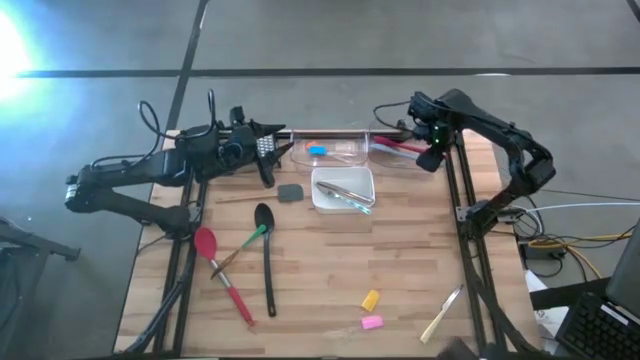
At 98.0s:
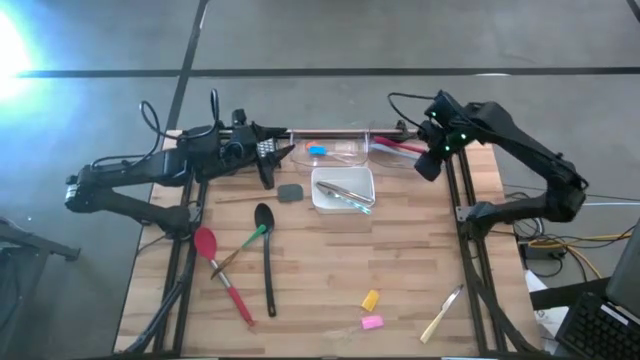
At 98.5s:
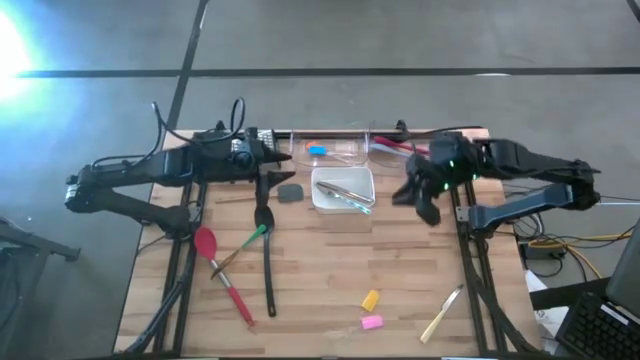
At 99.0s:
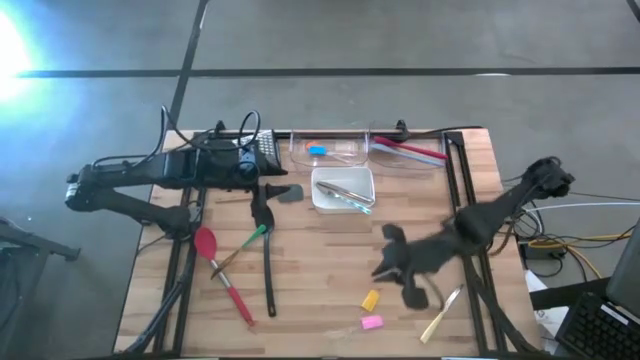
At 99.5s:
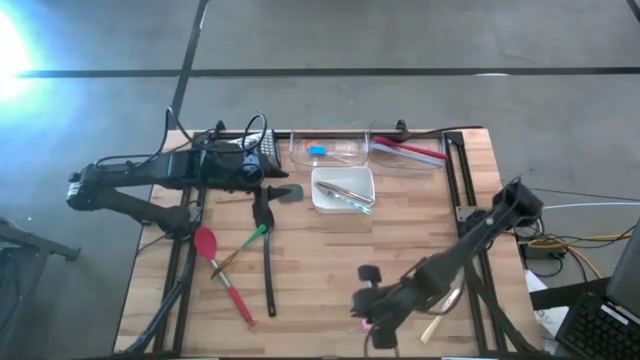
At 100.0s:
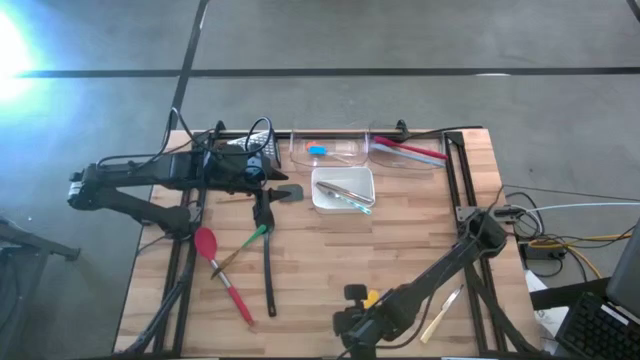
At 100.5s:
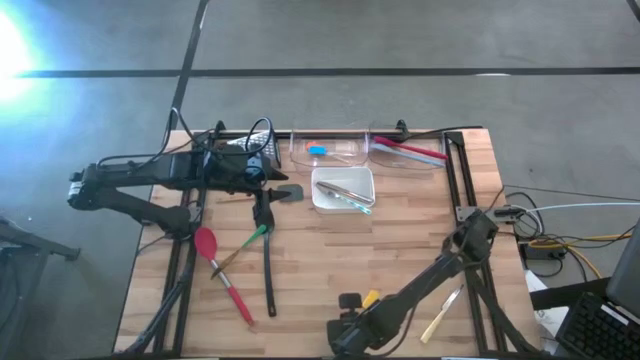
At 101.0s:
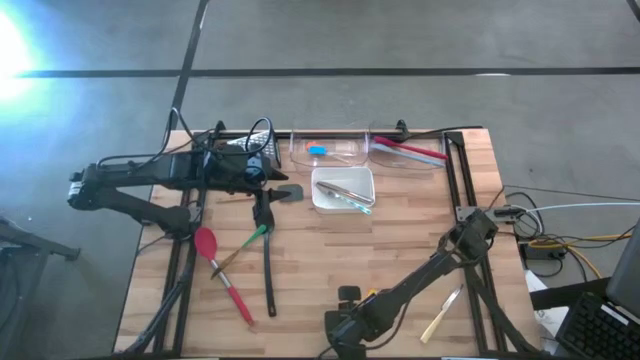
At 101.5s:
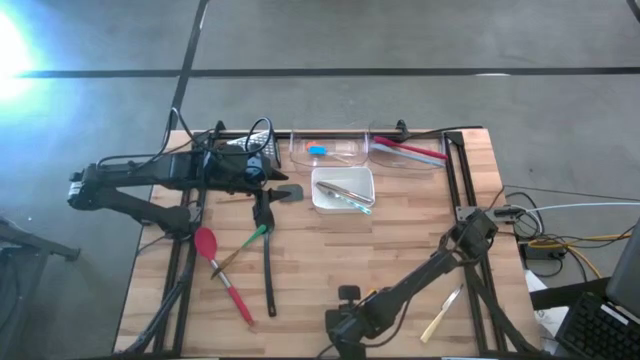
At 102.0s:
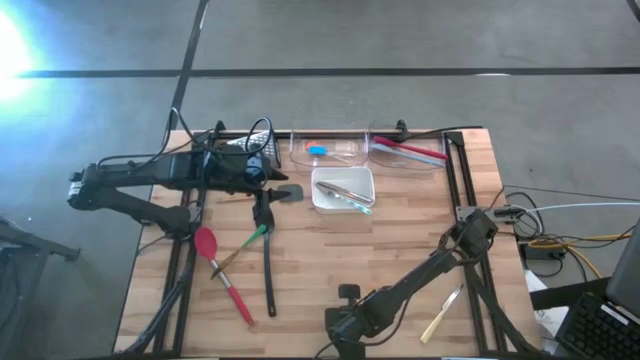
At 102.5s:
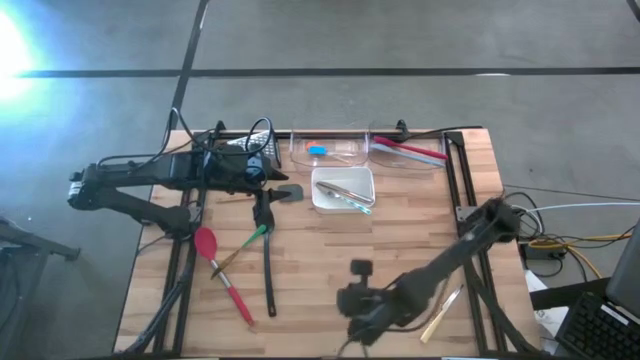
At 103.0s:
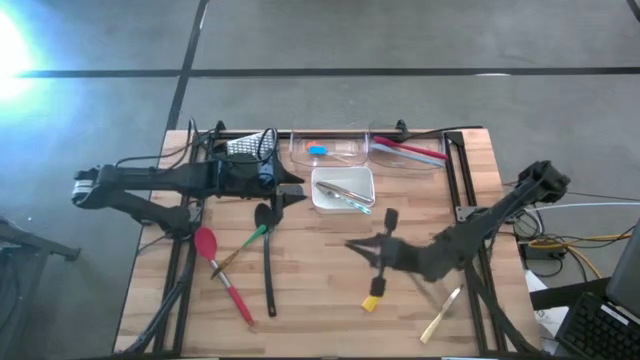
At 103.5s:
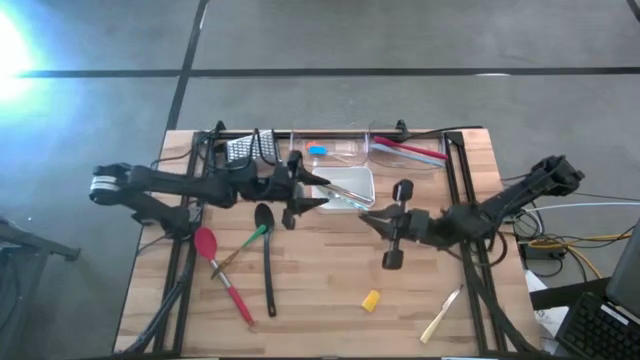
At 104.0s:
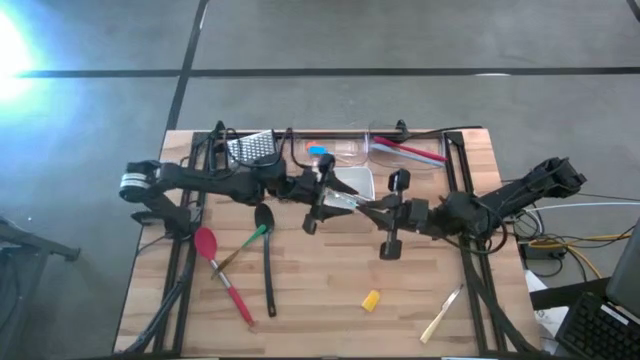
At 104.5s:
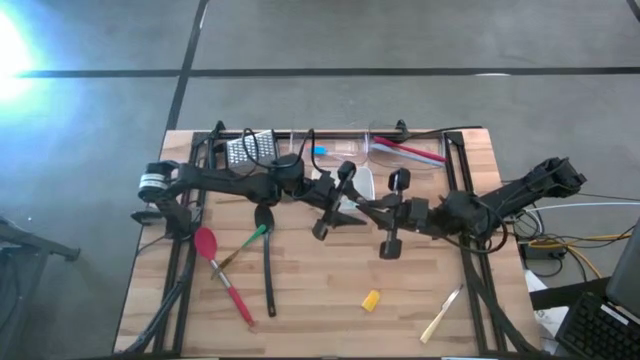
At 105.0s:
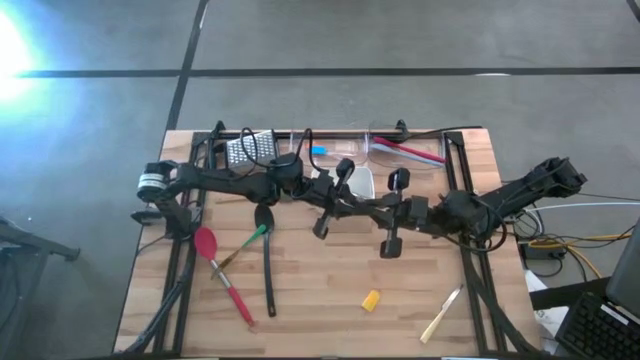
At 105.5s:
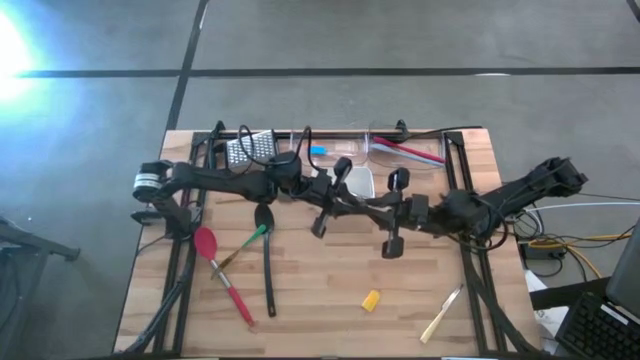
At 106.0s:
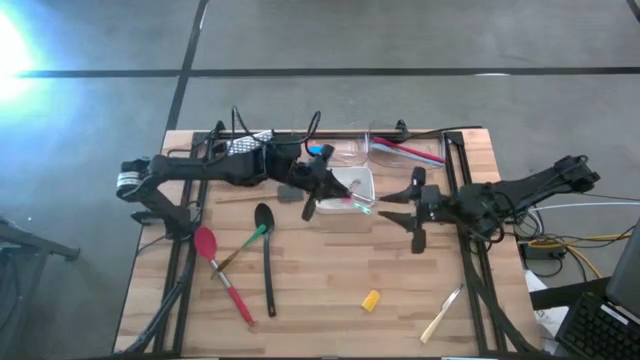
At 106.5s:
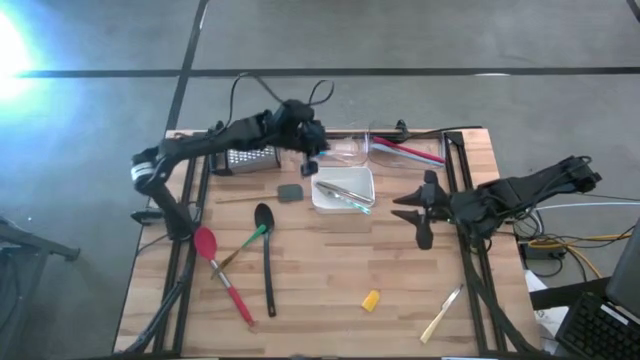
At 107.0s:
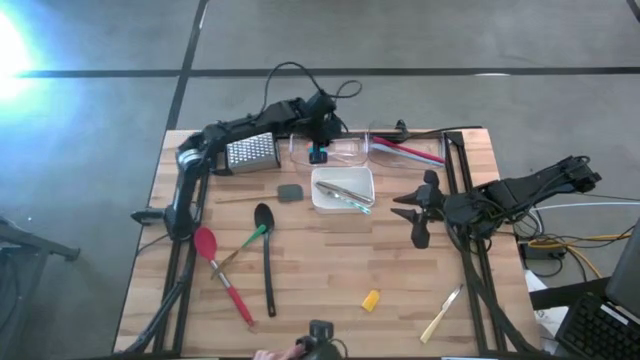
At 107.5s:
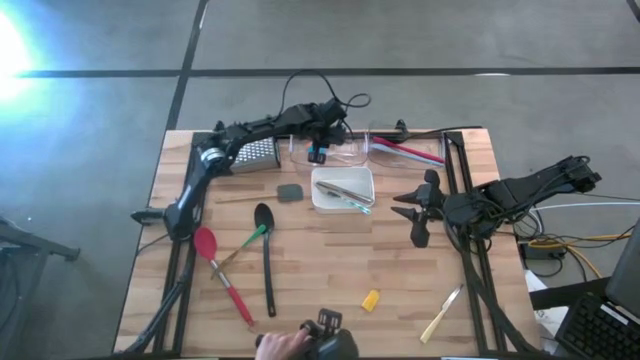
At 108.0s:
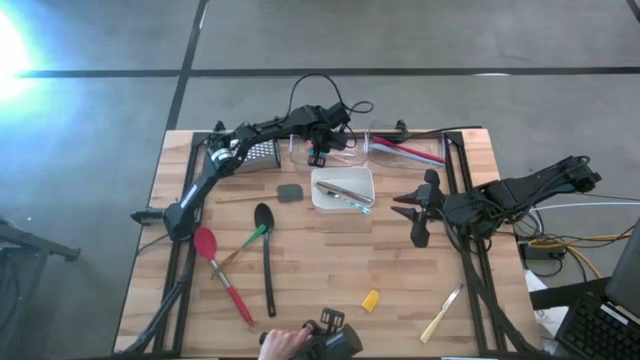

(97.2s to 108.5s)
Task: Pick & Place Kitchen Items
Put the pink spatula into the left transparent bin

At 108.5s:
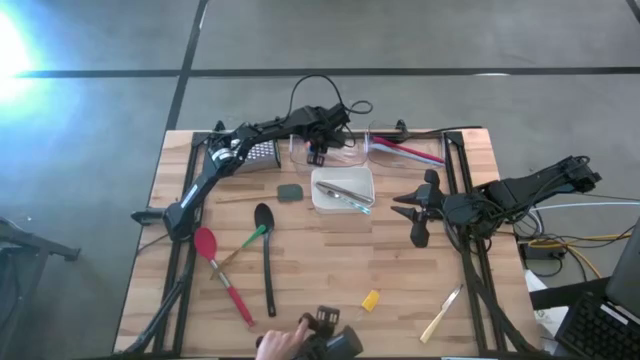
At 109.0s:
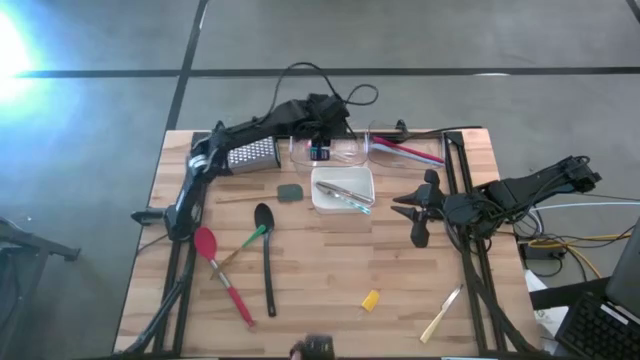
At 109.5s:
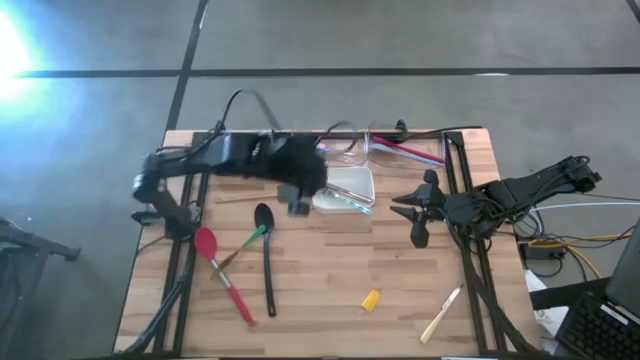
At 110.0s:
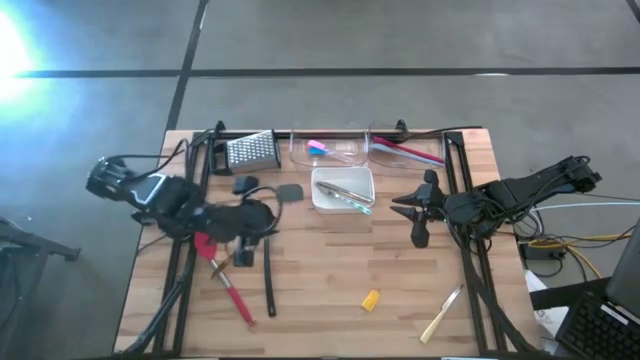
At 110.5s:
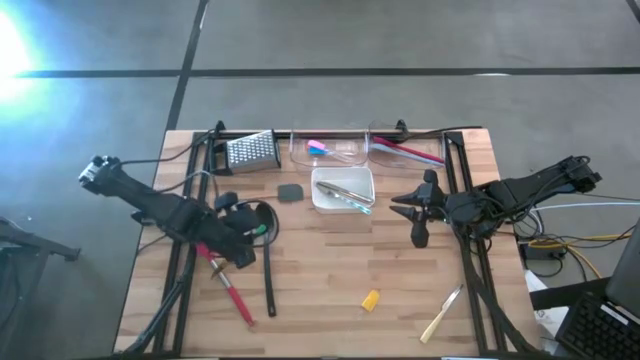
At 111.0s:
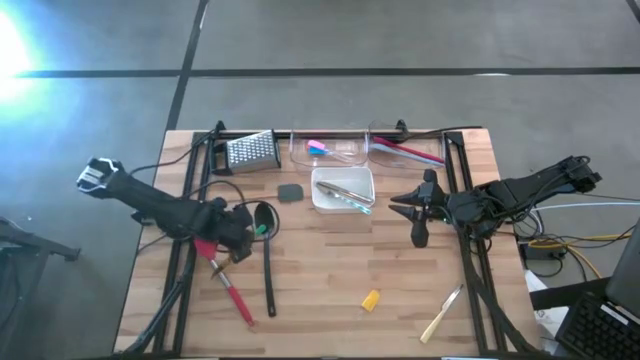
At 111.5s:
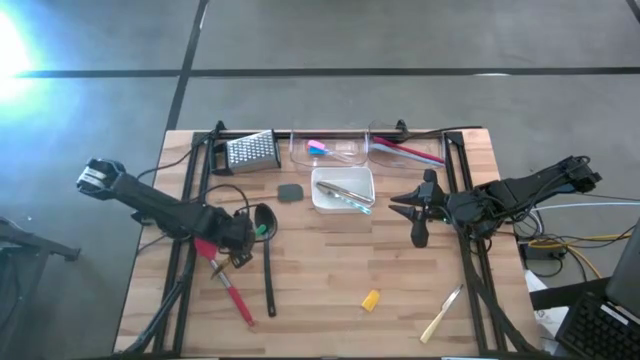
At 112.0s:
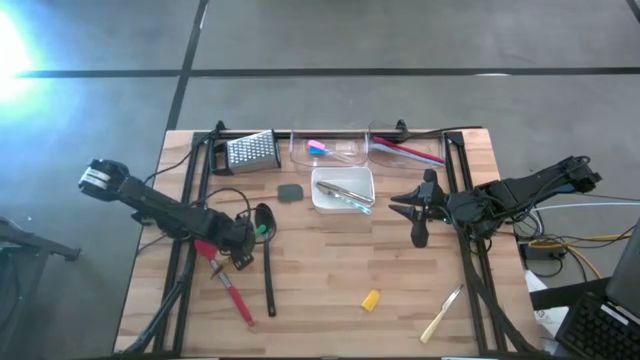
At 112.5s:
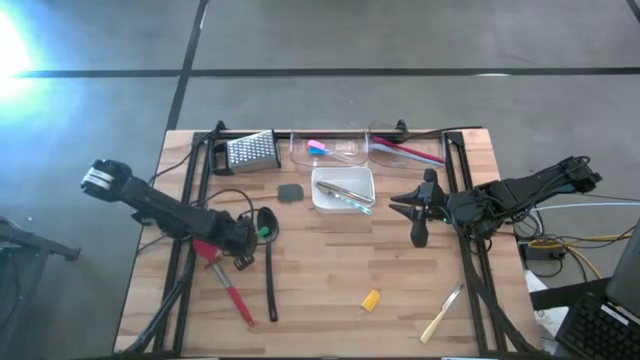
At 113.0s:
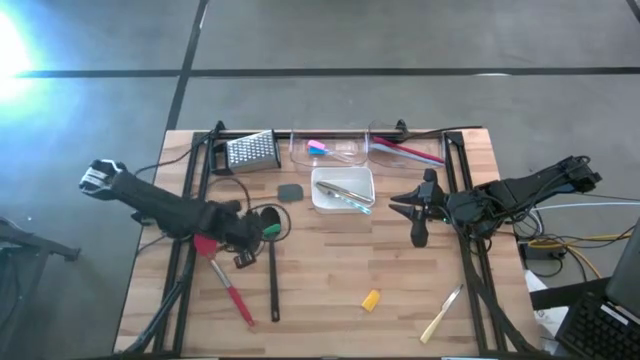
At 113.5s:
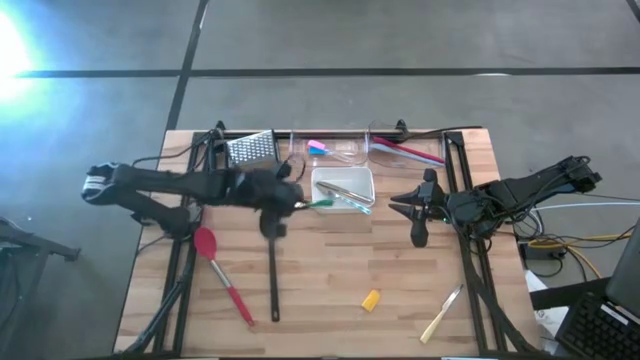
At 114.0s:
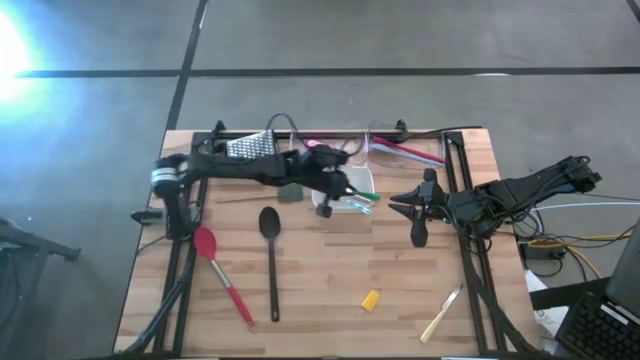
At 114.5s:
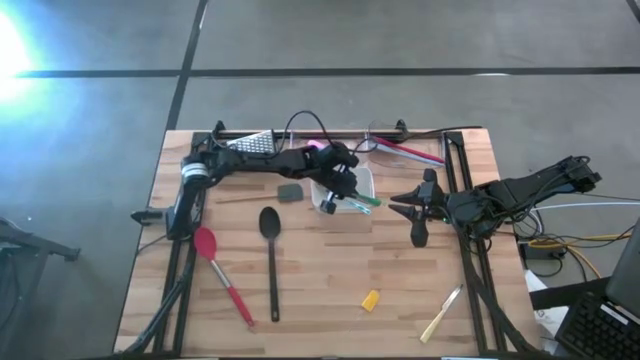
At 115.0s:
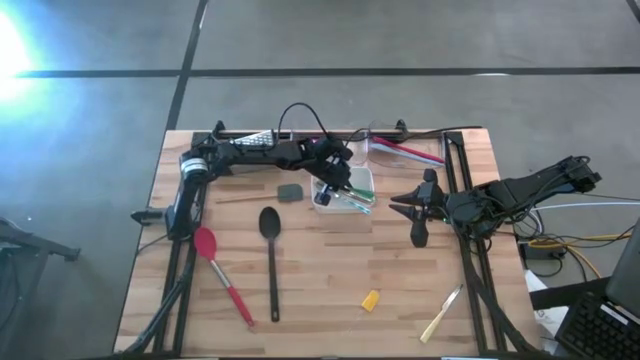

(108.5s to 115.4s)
Put the green table knife into the white bin

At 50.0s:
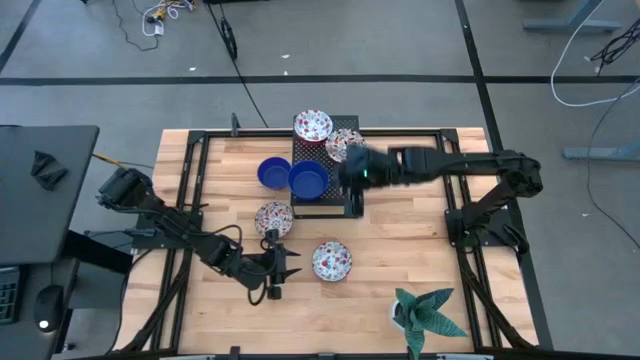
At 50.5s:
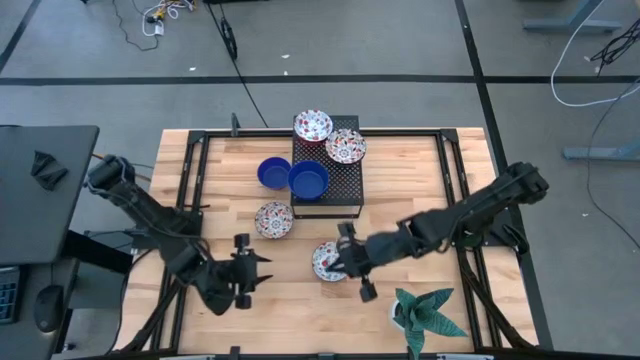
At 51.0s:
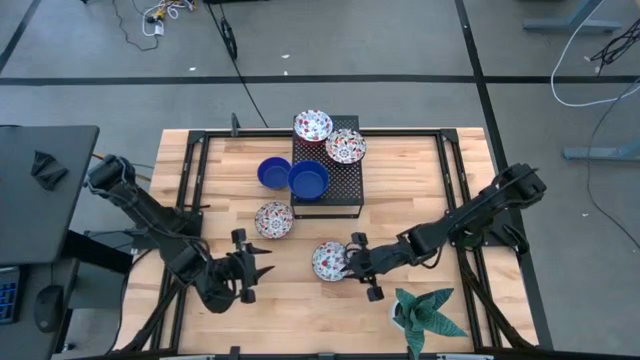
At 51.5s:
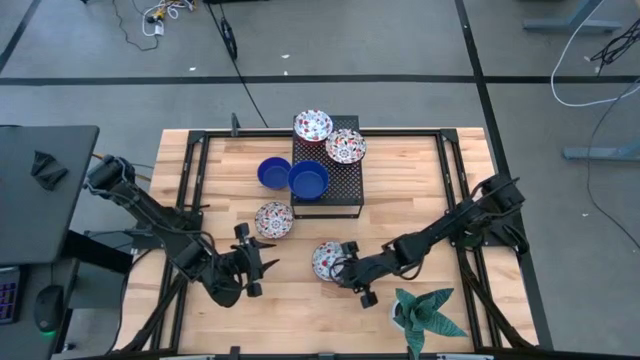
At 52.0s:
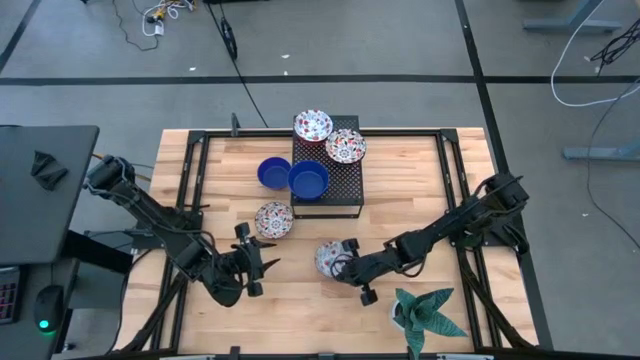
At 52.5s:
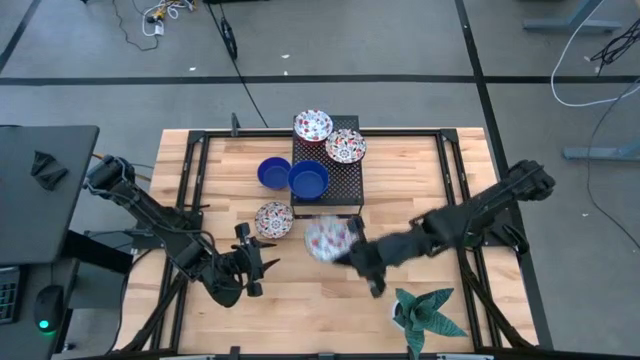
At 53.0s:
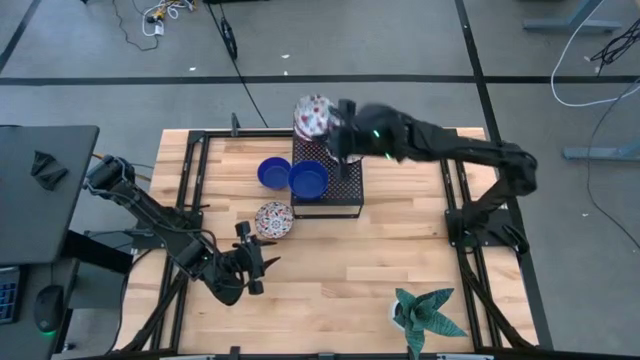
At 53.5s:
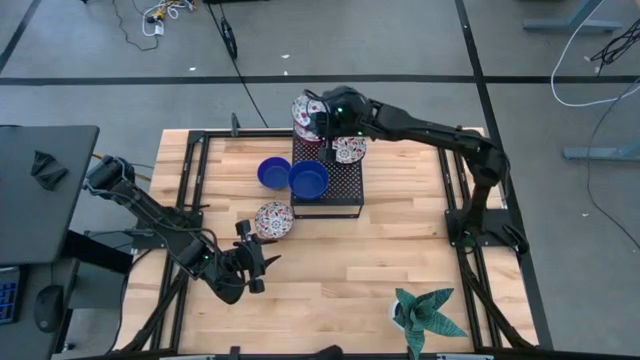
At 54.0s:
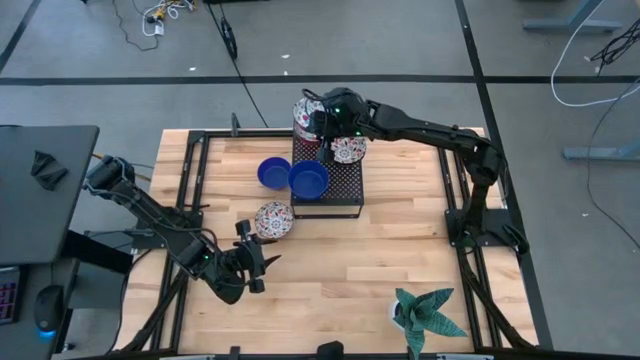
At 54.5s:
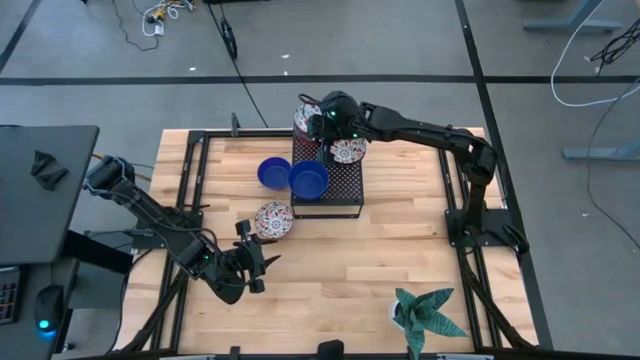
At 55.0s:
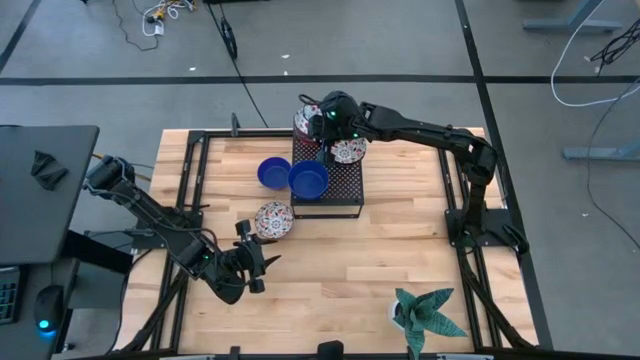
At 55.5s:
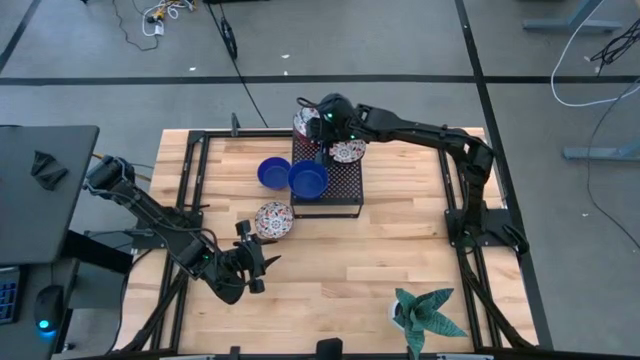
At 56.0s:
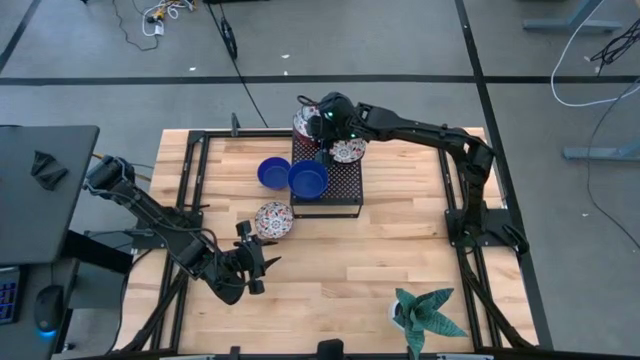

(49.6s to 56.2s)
Task: Pick & Place Mini bowls
Stack the red patterned bowl on the red patterned bowl on the shelf
